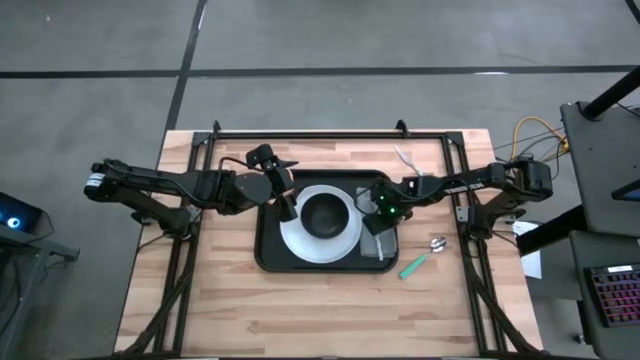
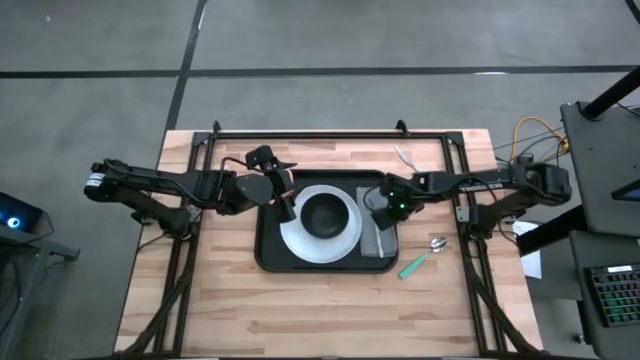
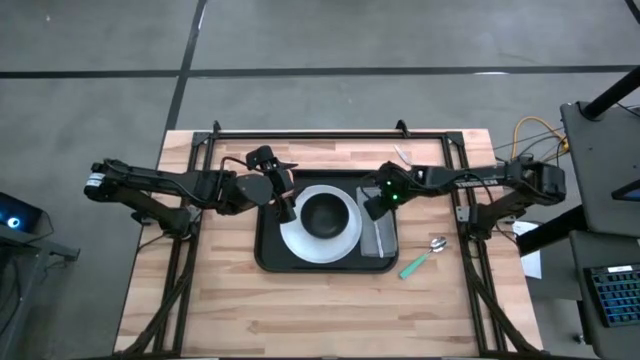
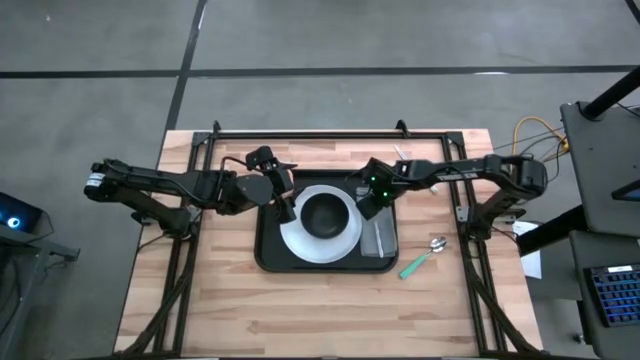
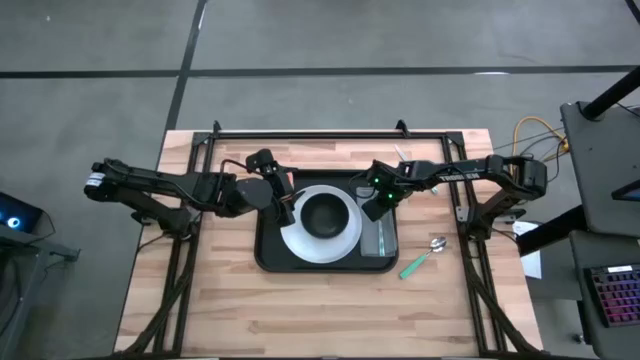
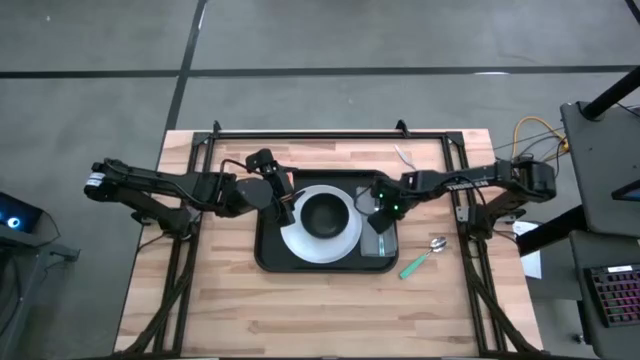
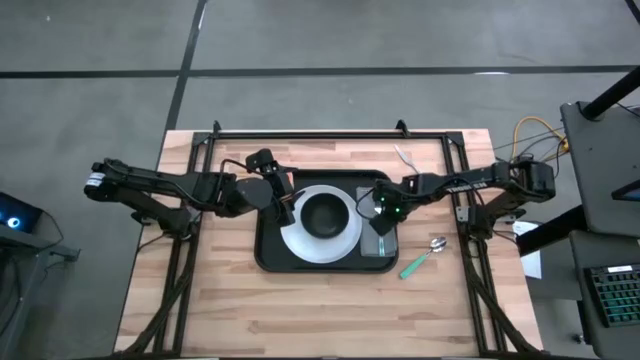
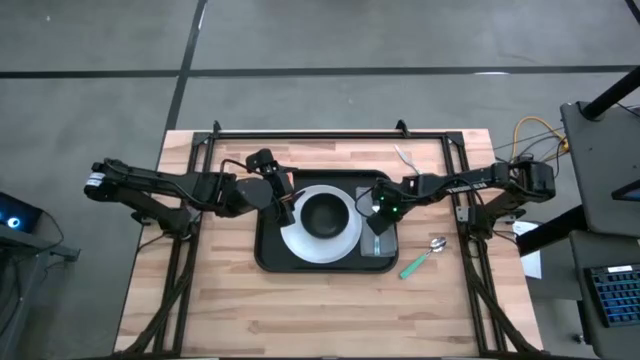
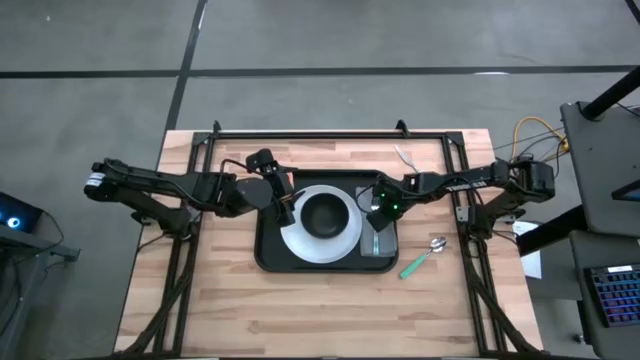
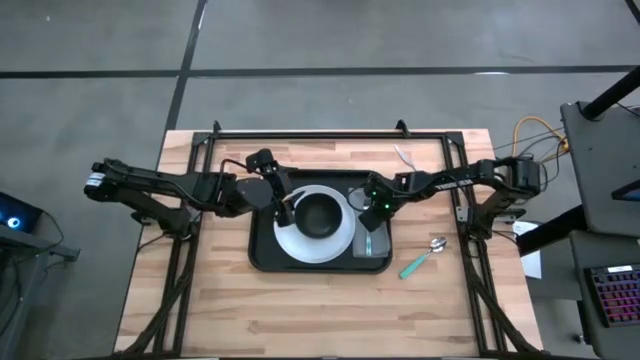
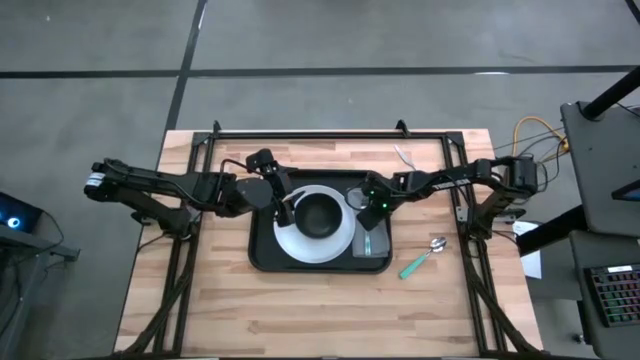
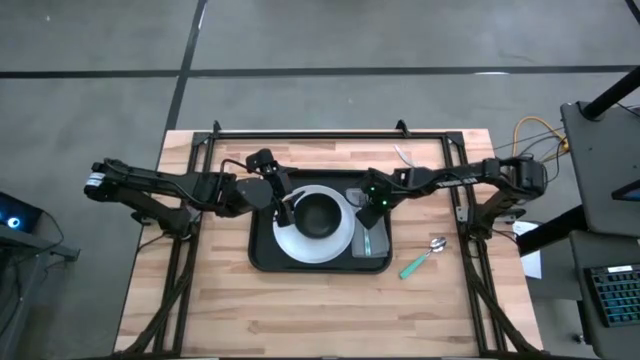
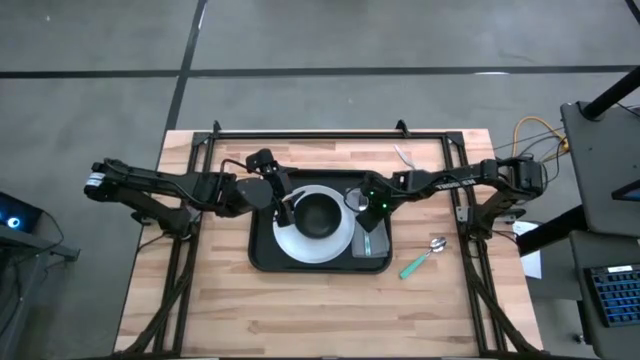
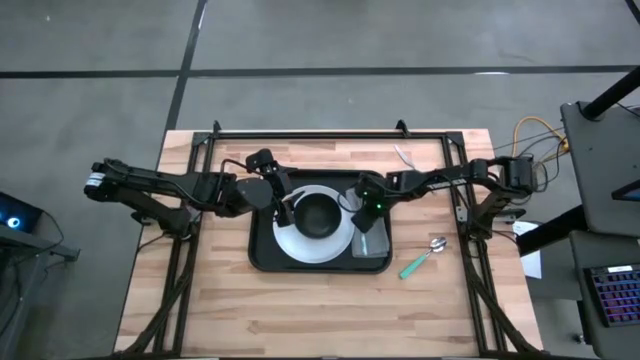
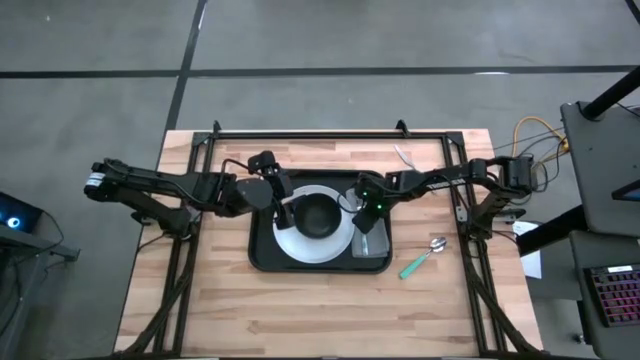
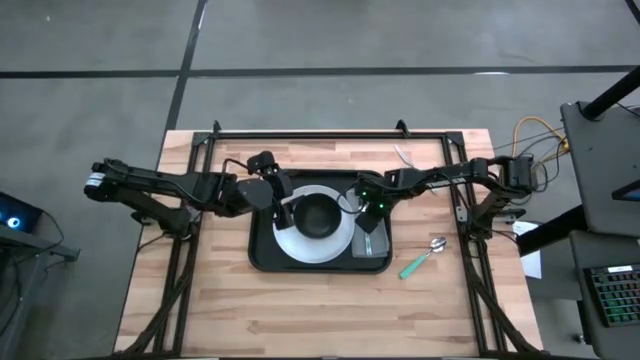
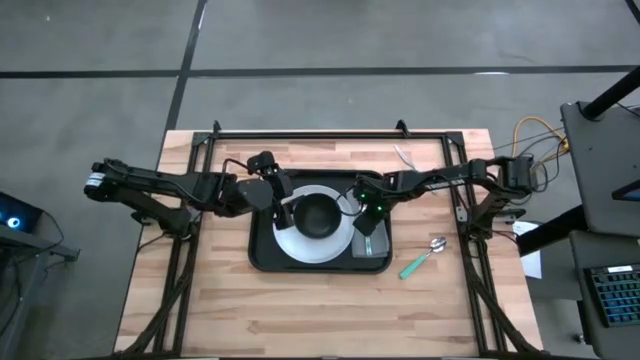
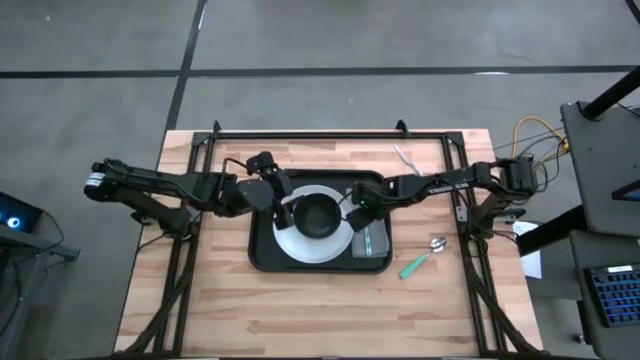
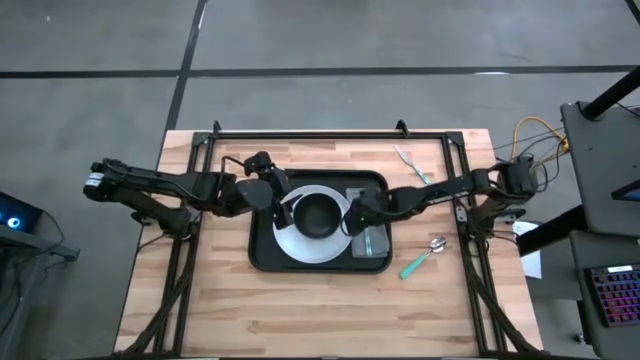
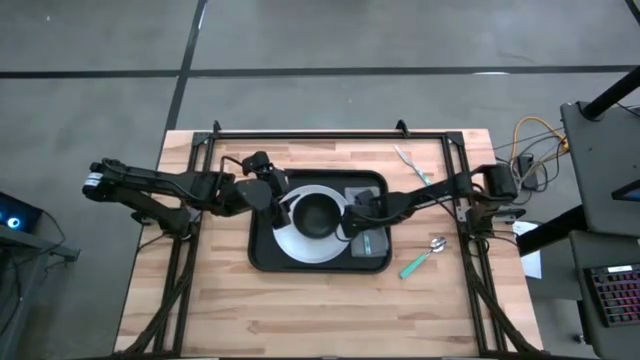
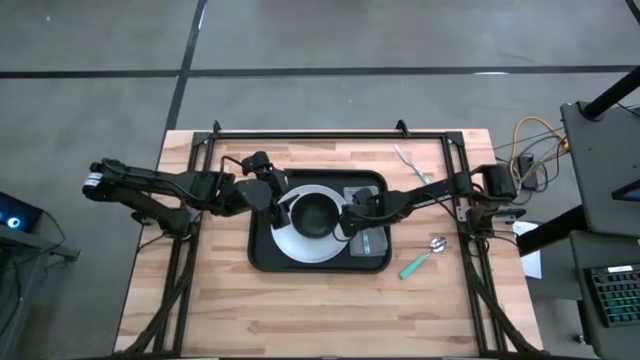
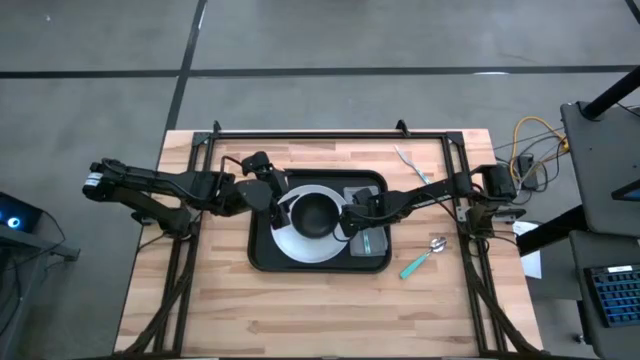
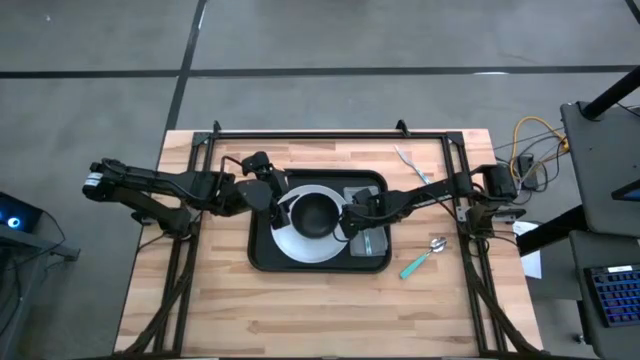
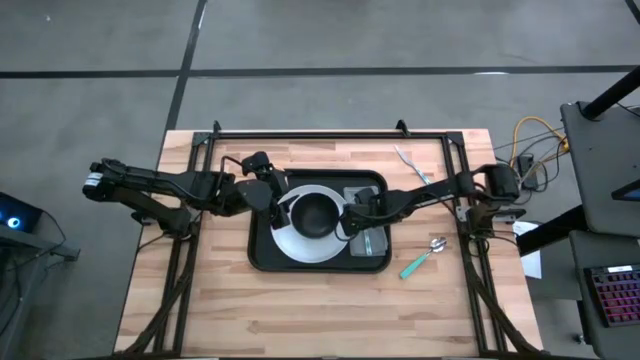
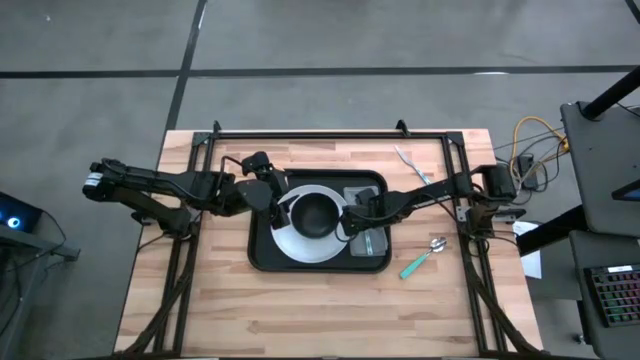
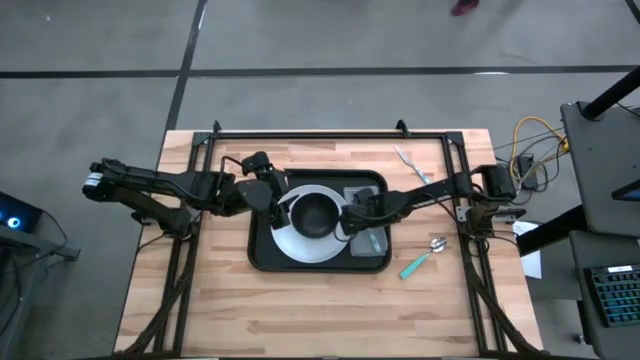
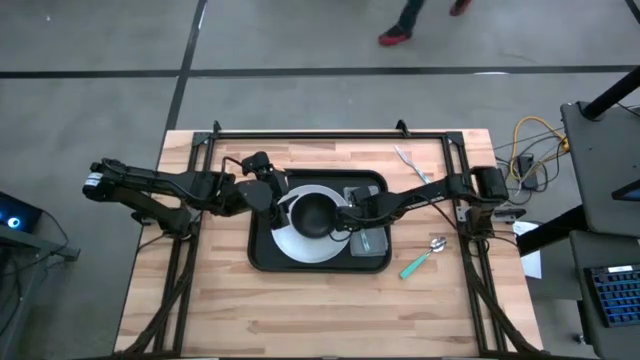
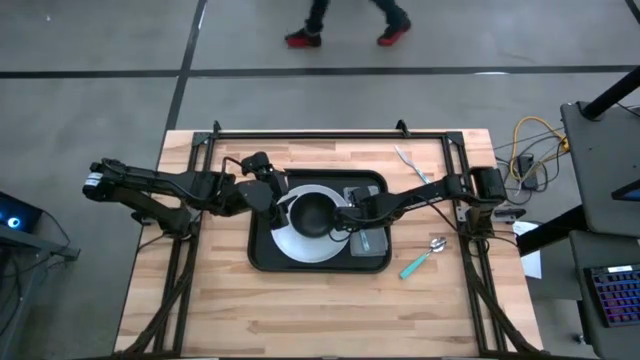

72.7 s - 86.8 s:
Task: Set up tray
Put the blue fork on top of the gray table napkin on the black serving tray

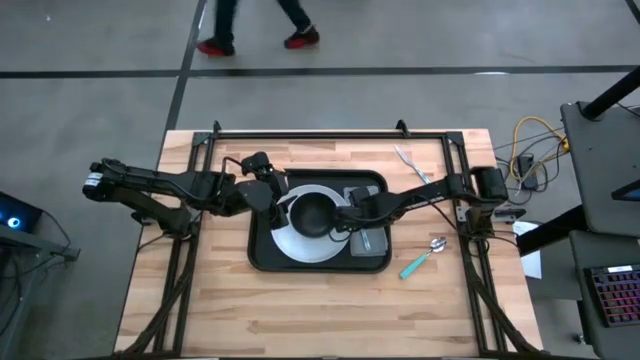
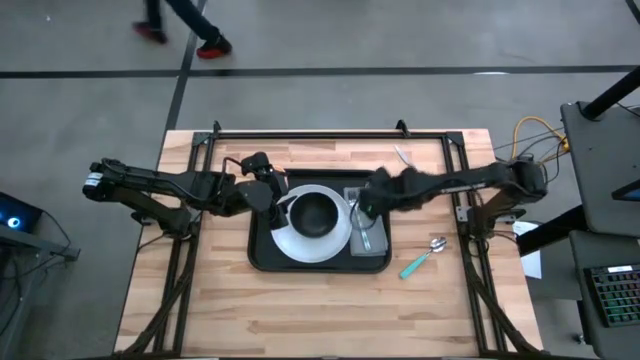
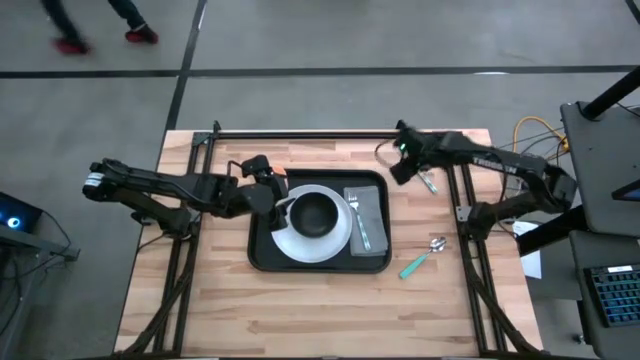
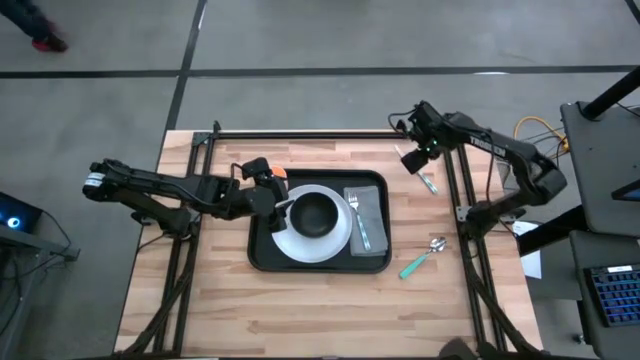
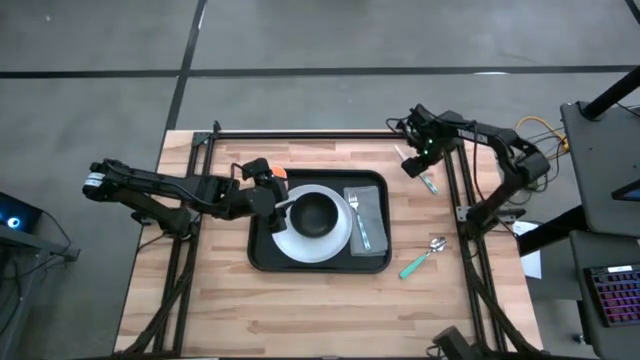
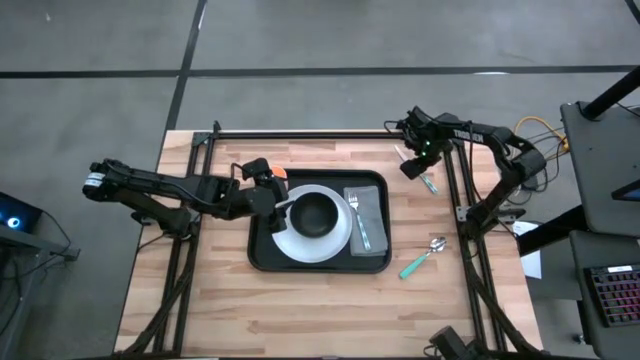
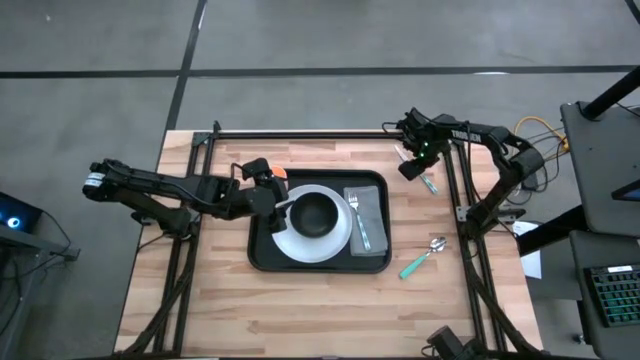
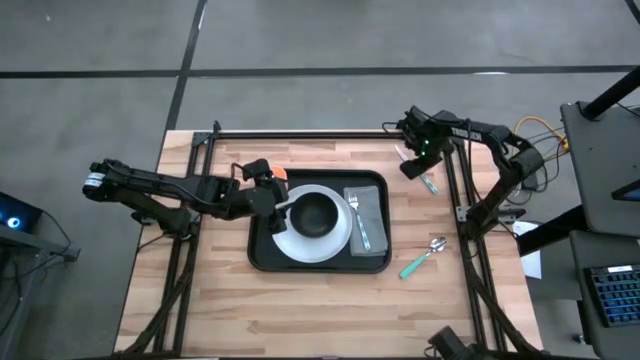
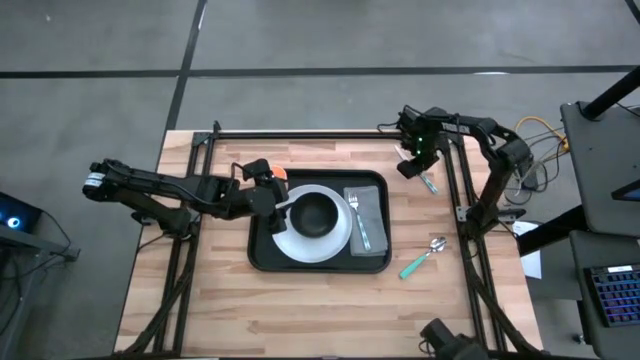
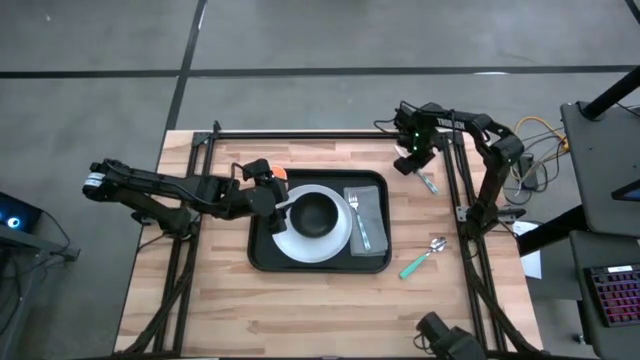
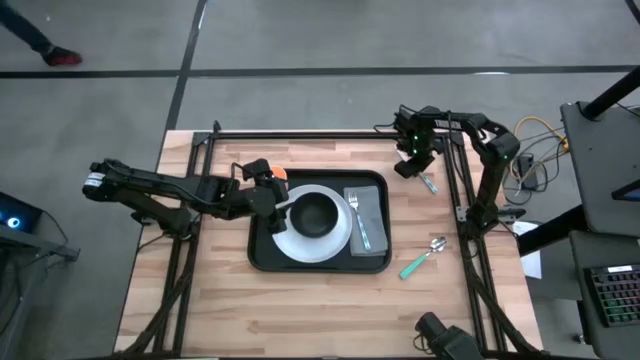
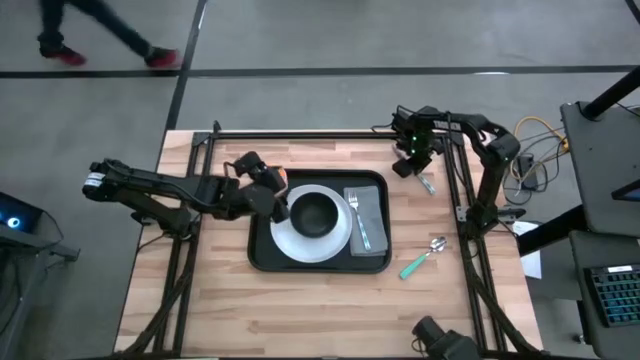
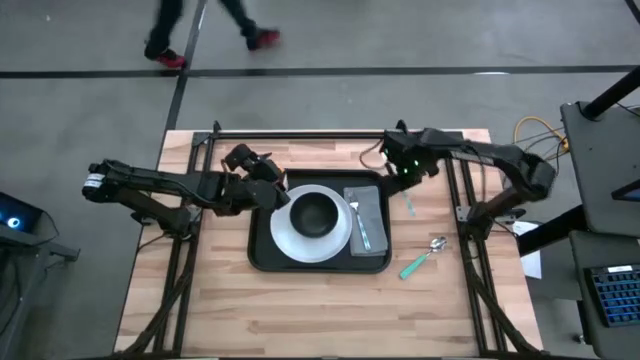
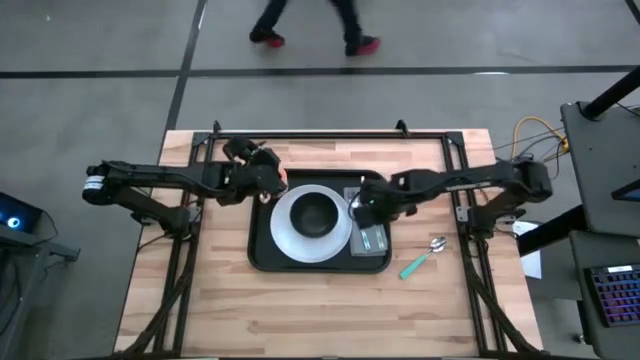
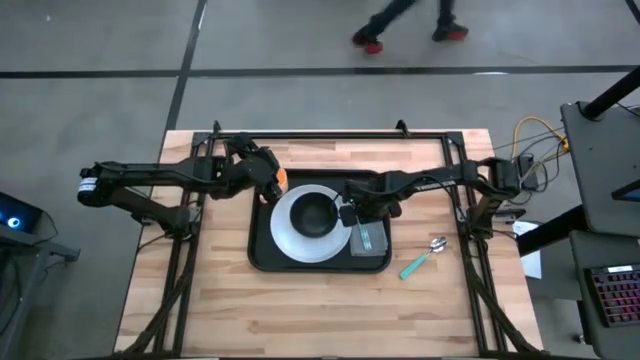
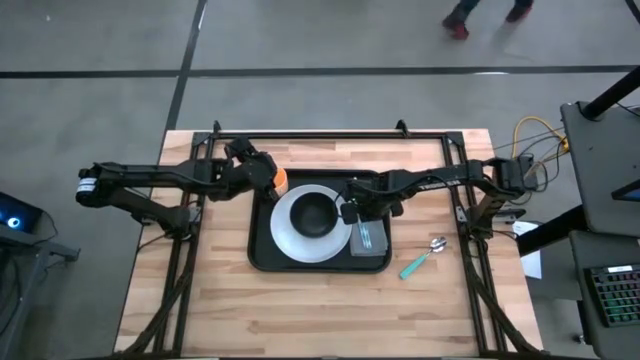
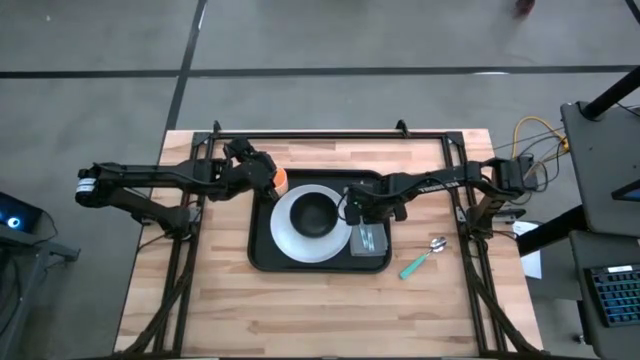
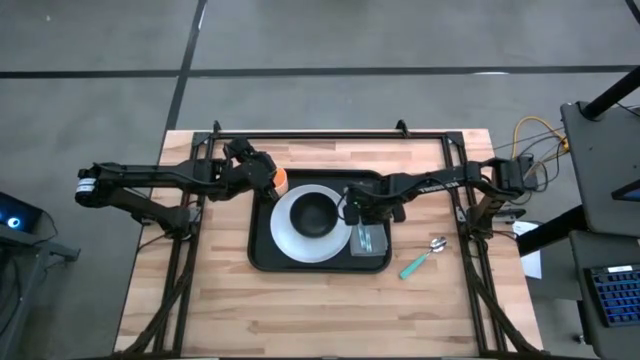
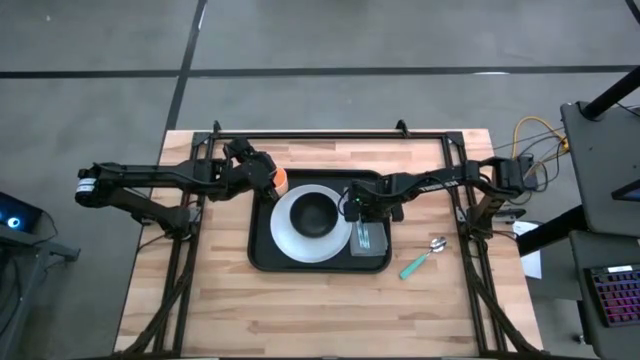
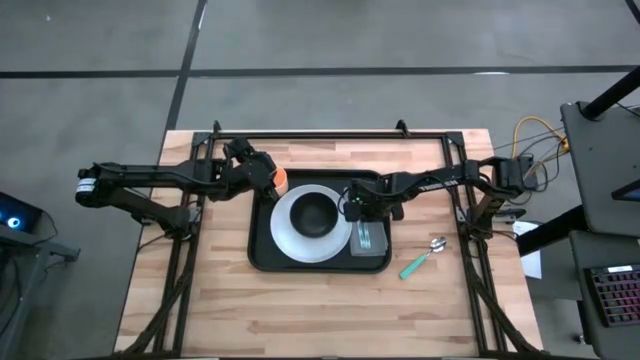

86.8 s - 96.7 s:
Put the blue knife on top of the gray table napkin to the right of the blue fork on the black serving tray
